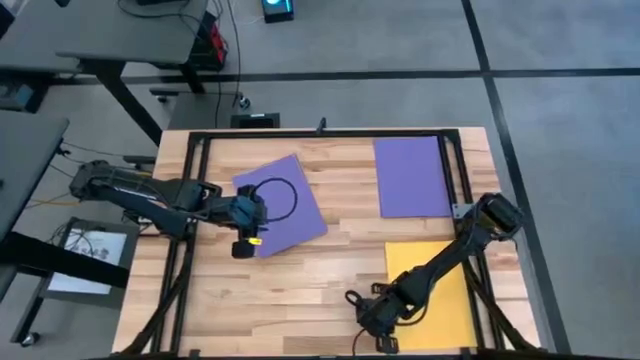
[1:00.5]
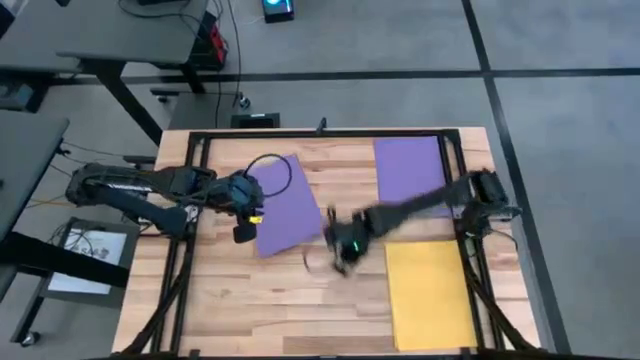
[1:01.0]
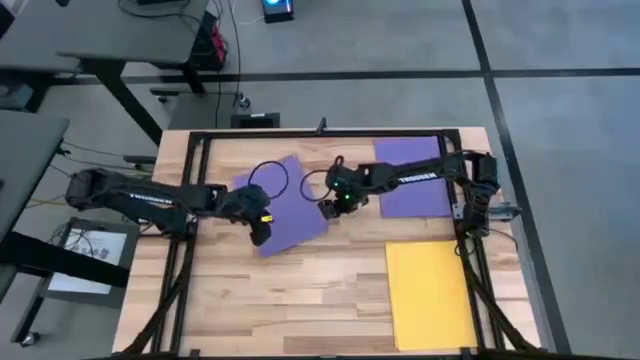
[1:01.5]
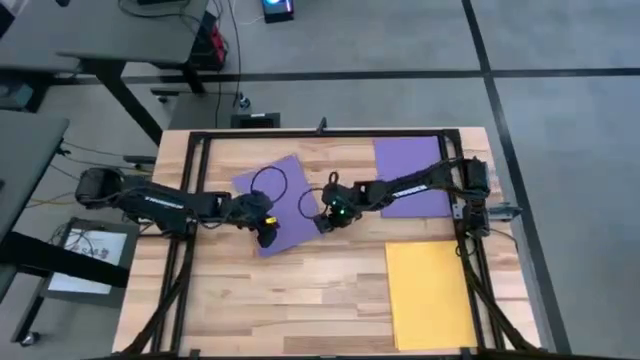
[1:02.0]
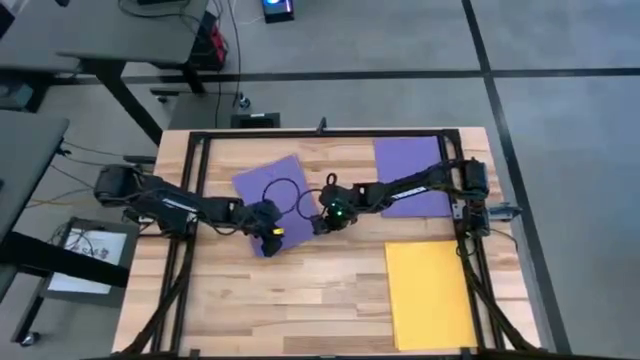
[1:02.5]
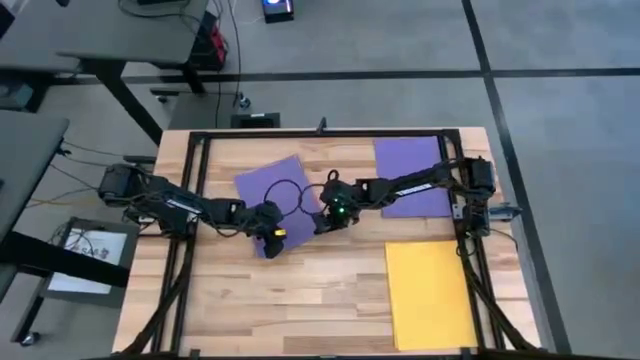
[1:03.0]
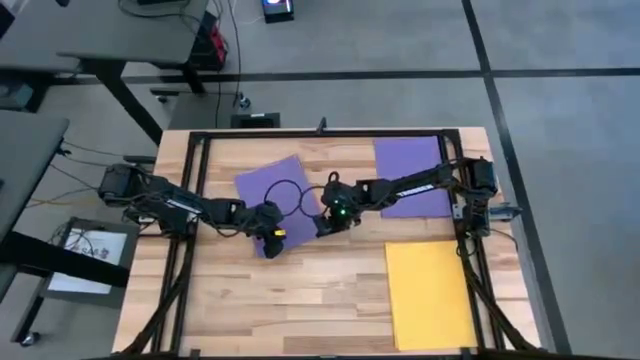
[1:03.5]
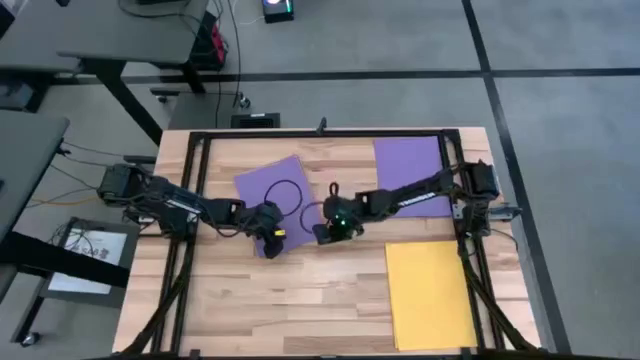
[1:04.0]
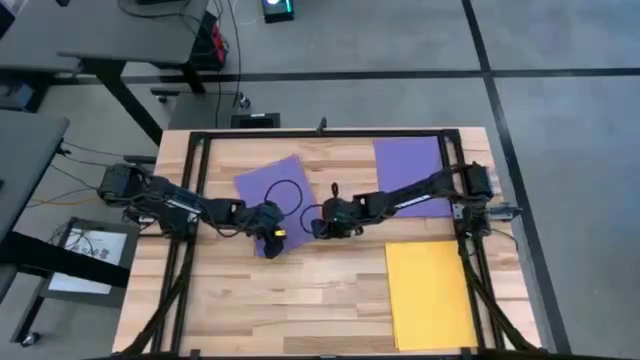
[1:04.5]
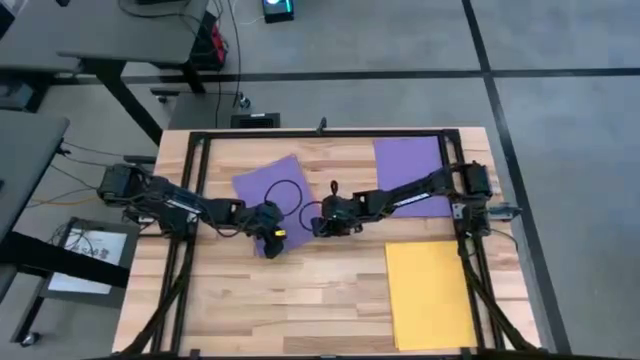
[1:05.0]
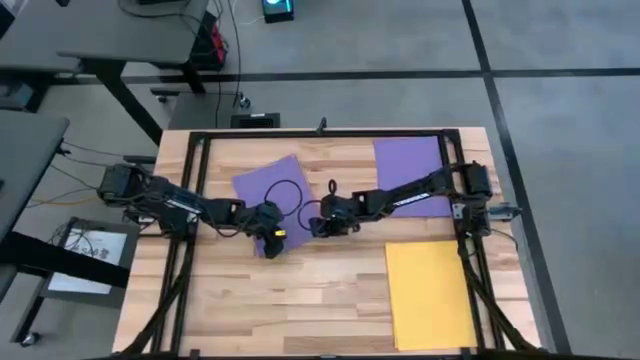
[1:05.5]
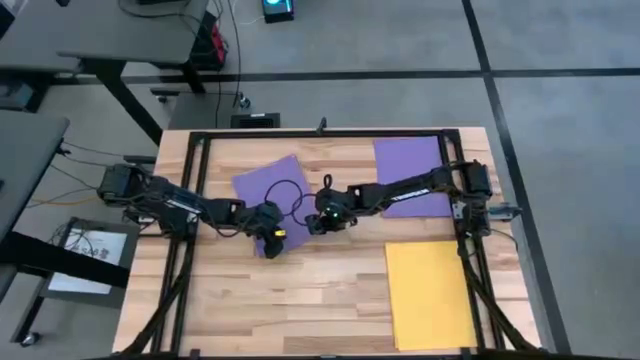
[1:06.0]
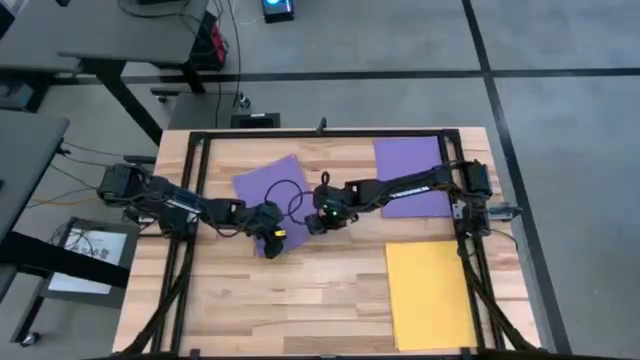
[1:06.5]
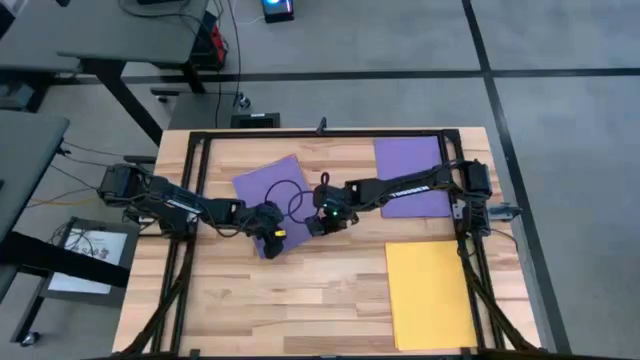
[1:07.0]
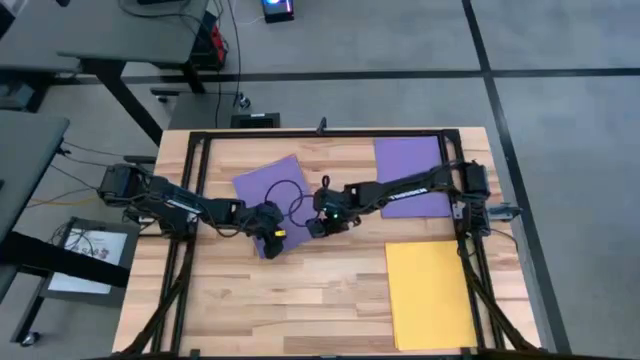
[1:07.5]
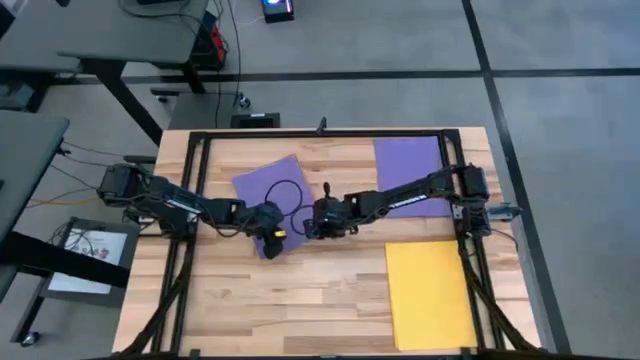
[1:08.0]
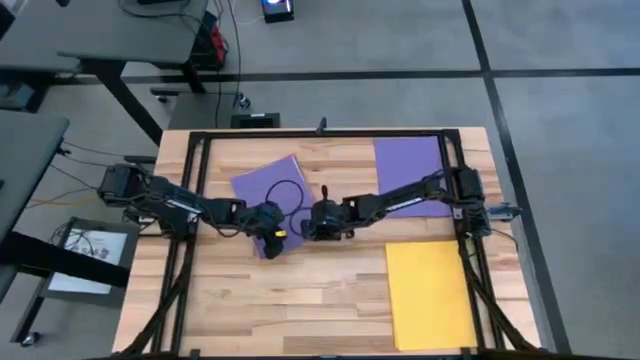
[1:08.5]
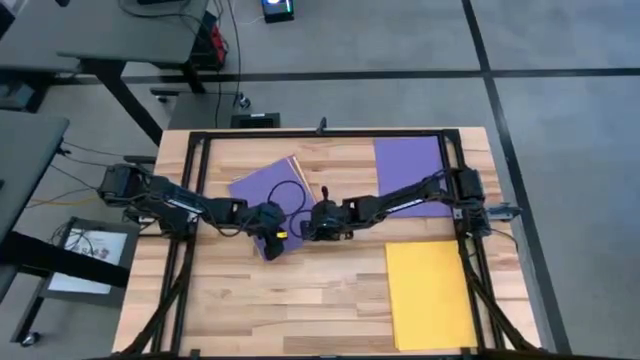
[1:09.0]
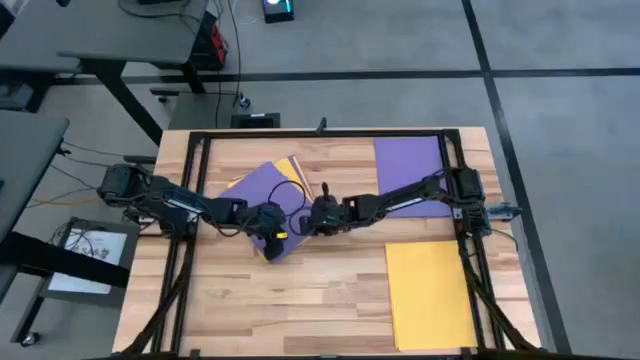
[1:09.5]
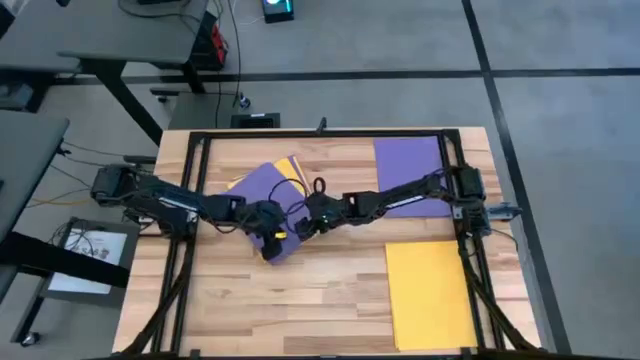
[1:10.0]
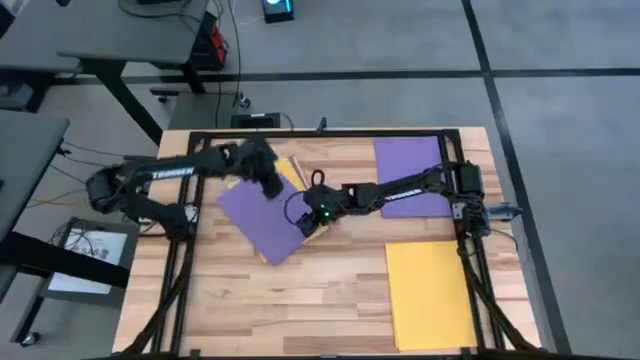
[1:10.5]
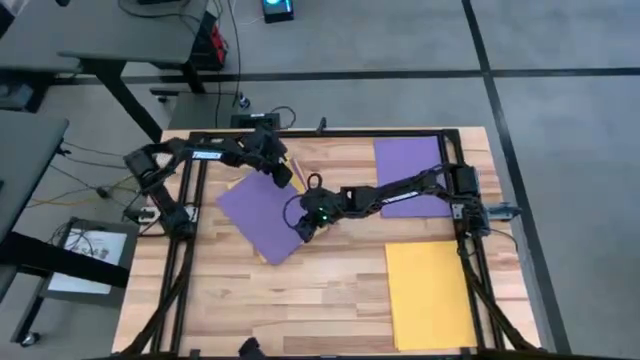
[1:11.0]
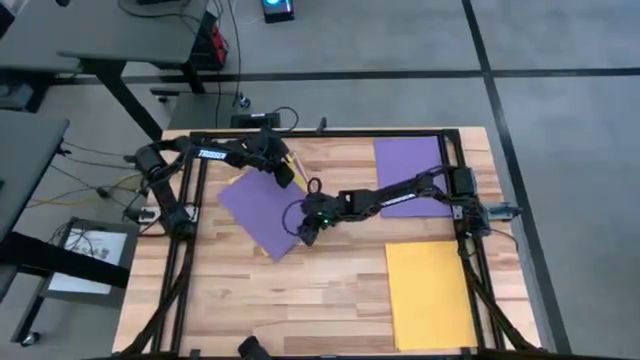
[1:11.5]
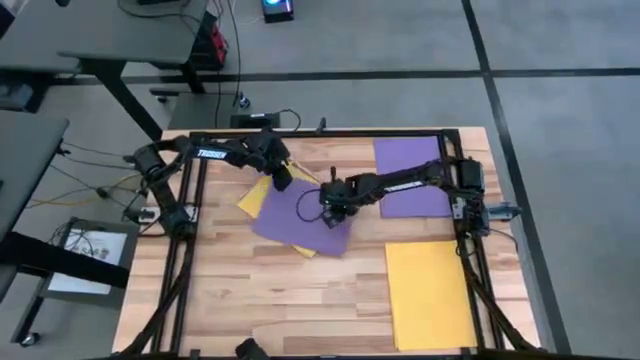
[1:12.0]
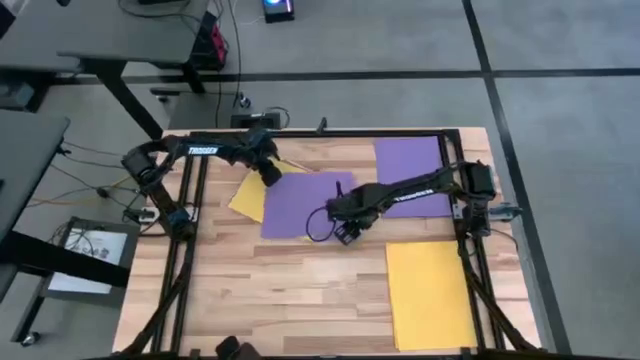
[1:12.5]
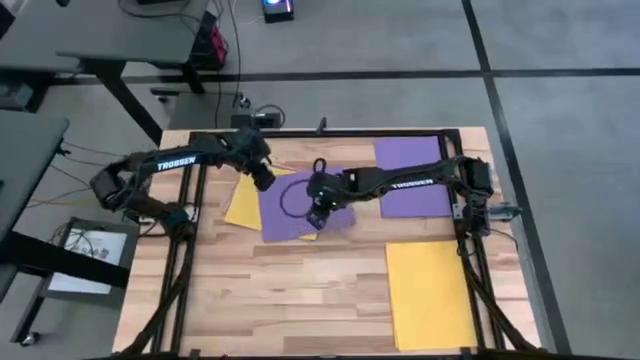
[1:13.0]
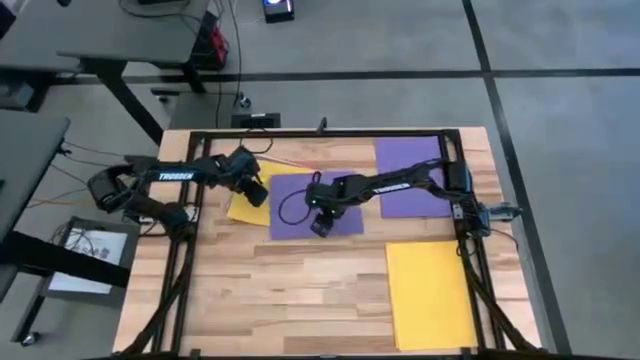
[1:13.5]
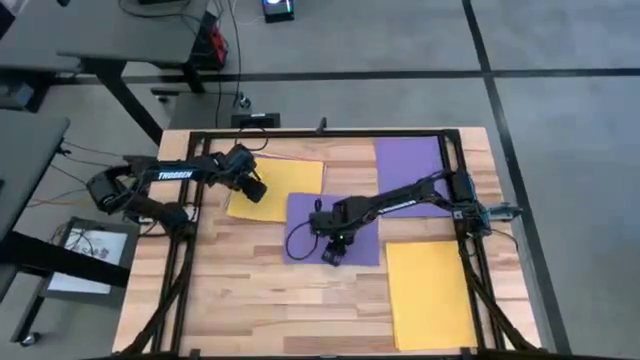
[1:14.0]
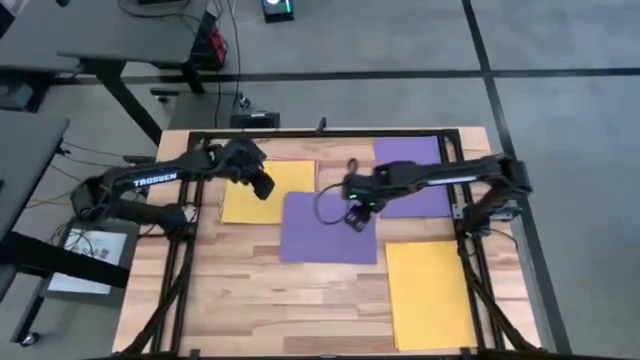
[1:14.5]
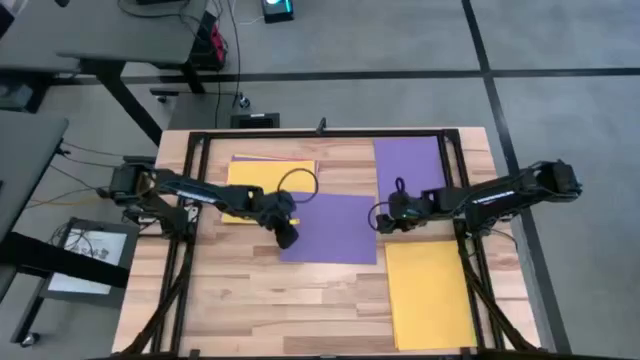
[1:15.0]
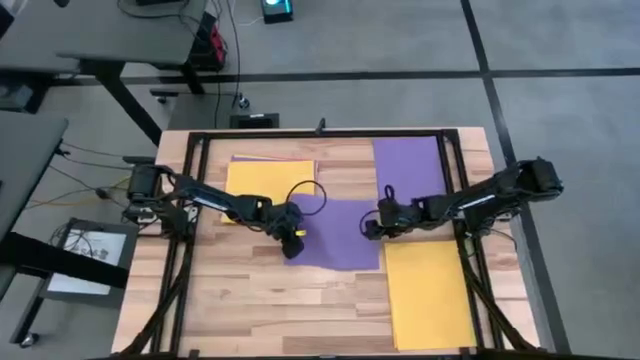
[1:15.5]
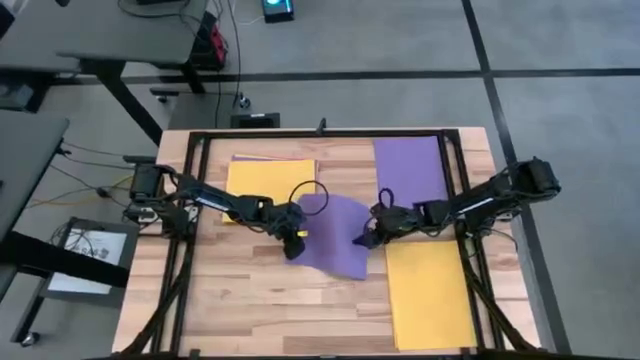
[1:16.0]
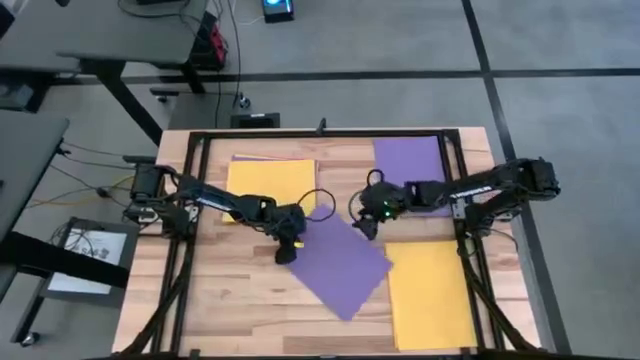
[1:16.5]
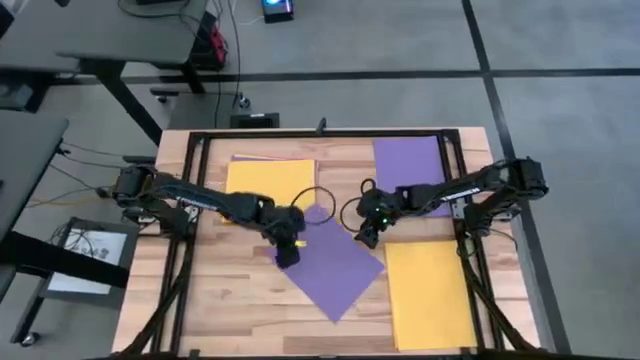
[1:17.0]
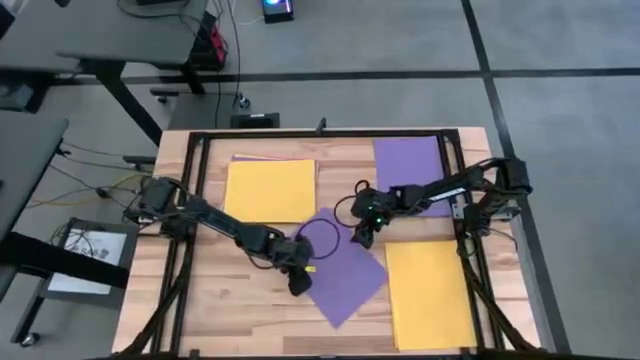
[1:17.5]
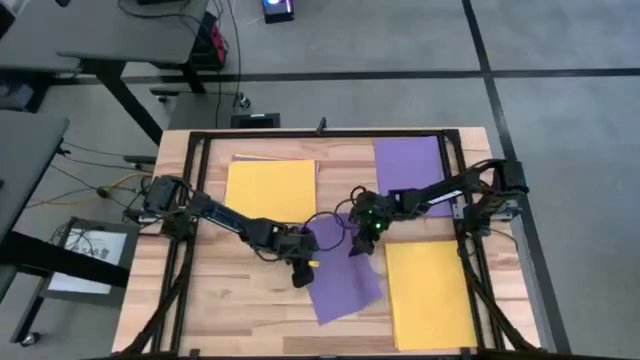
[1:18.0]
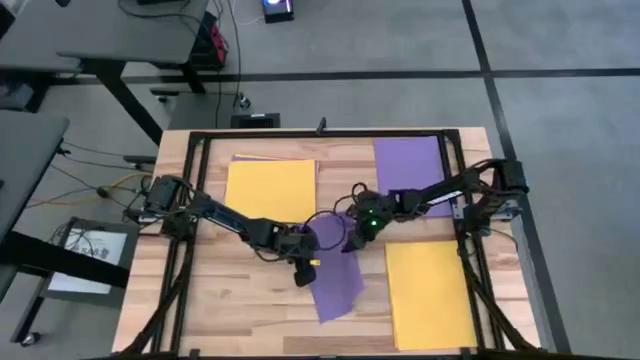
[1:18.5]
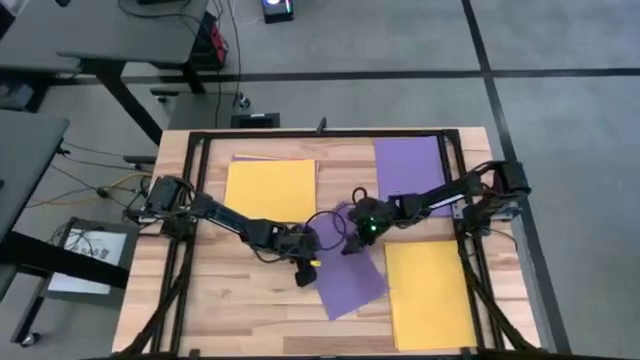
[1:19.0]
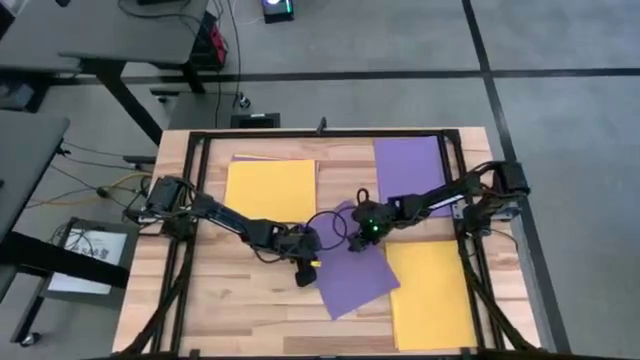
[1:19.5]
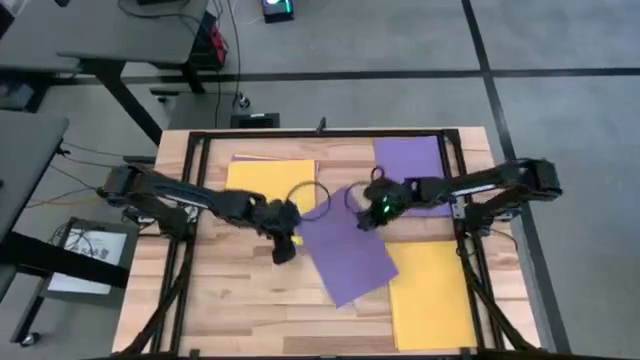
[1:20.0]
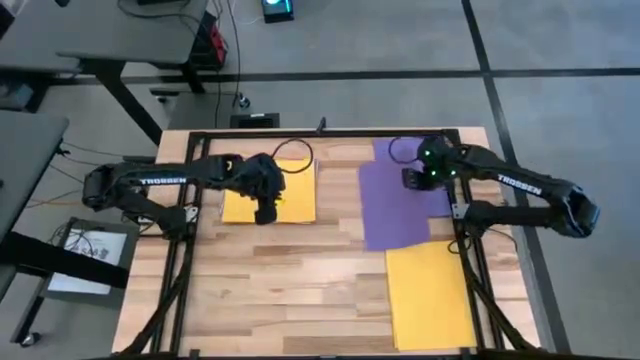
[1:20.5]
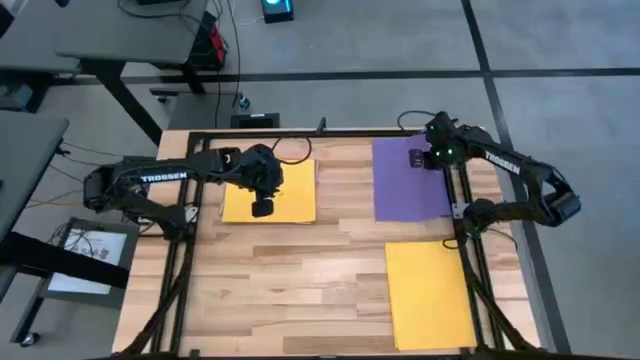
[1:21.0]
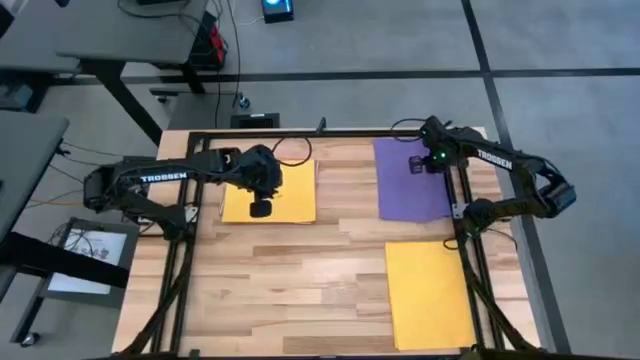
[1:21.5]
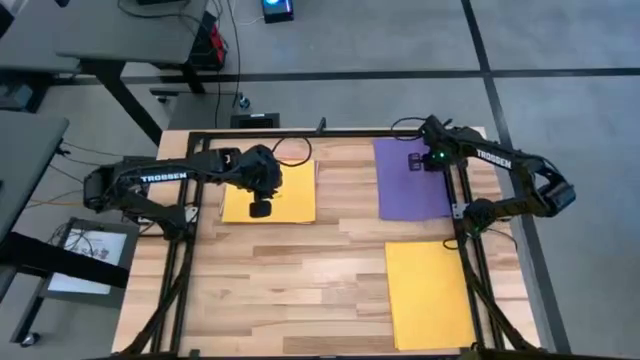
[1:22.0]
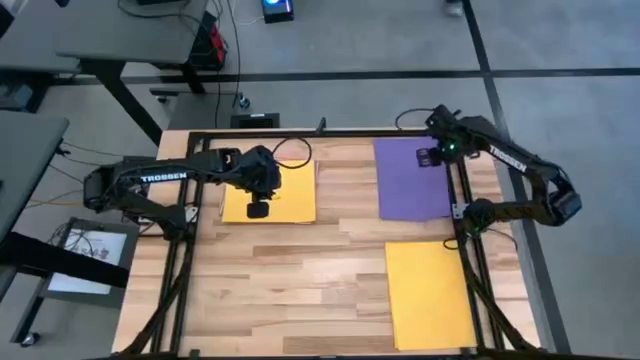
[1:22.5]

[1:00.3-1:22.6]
Task: Organize paper
Stack the purple paper on the top right purple papers
